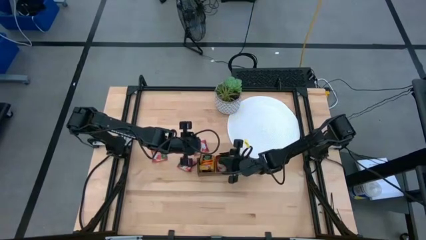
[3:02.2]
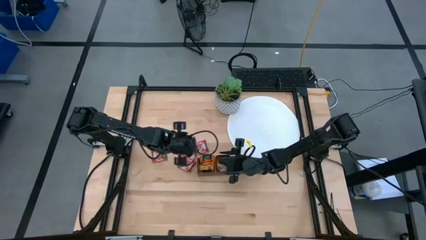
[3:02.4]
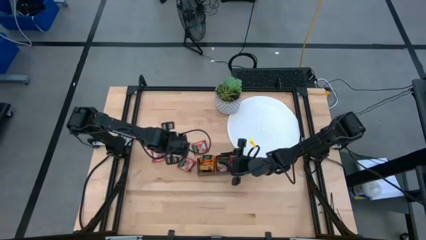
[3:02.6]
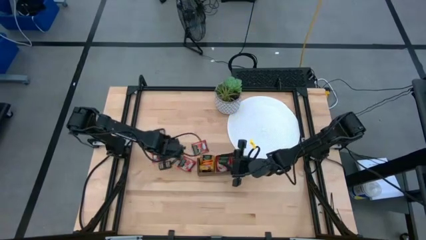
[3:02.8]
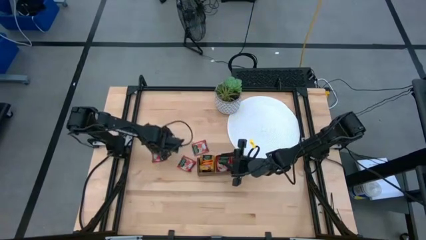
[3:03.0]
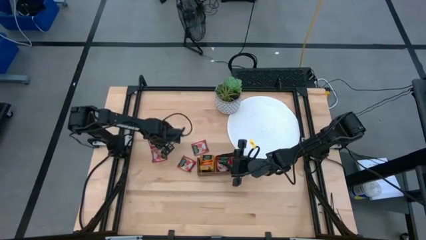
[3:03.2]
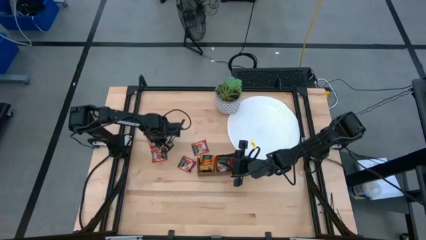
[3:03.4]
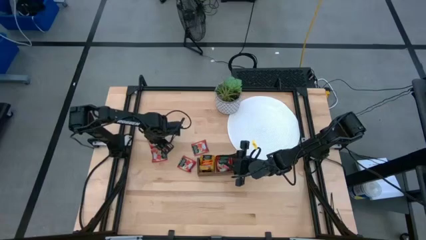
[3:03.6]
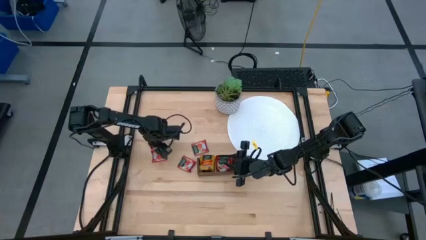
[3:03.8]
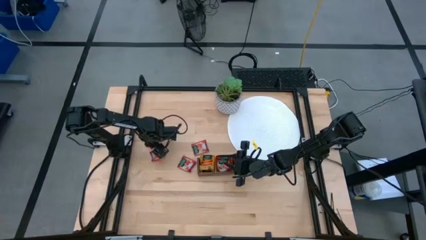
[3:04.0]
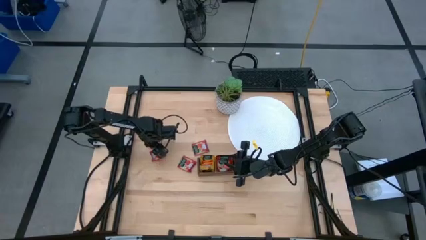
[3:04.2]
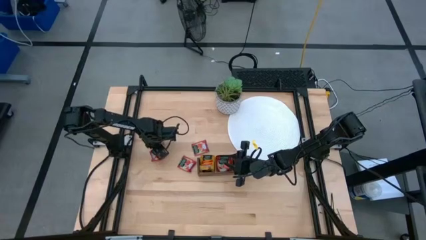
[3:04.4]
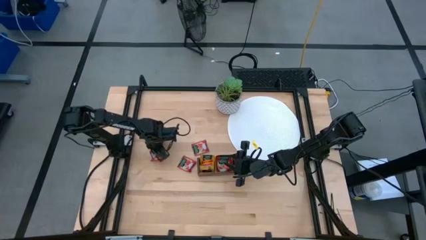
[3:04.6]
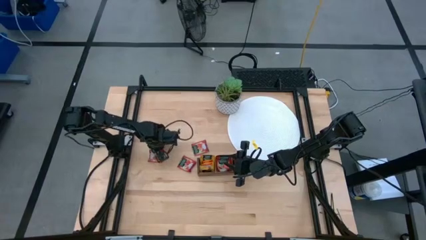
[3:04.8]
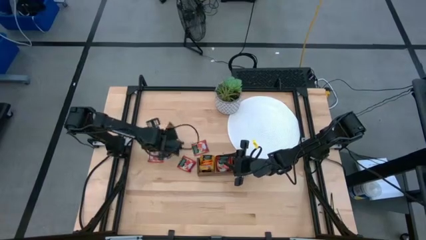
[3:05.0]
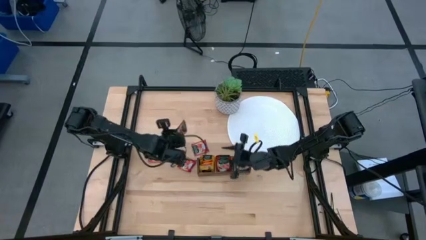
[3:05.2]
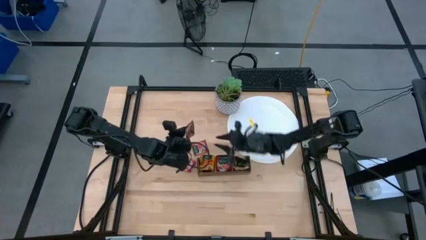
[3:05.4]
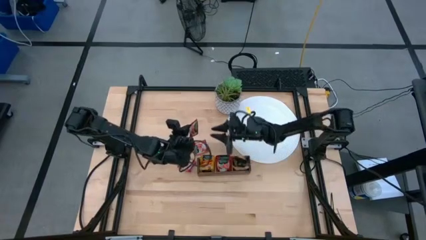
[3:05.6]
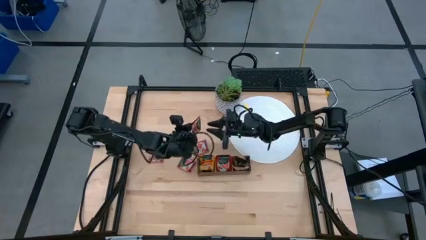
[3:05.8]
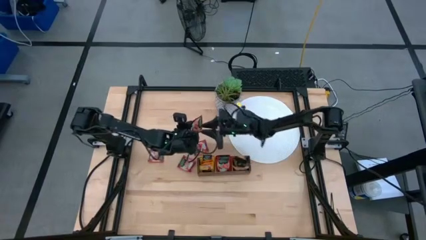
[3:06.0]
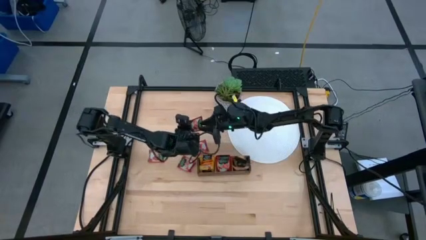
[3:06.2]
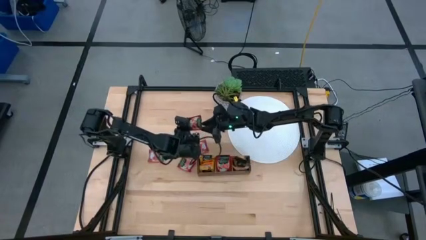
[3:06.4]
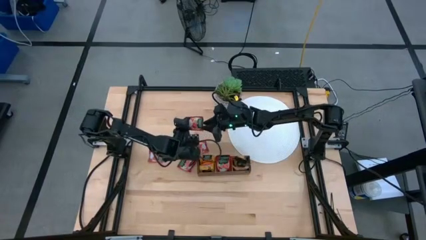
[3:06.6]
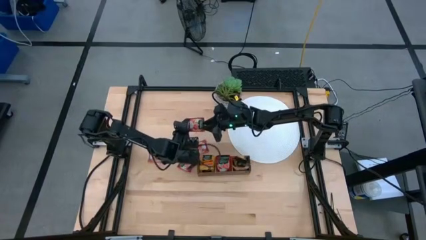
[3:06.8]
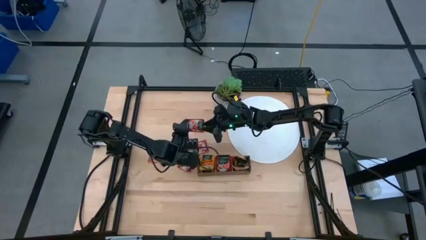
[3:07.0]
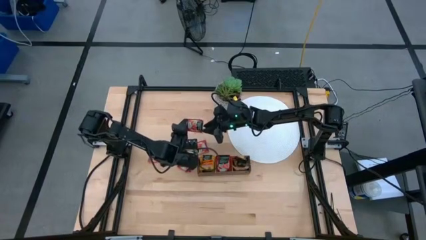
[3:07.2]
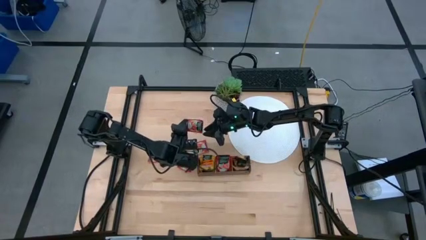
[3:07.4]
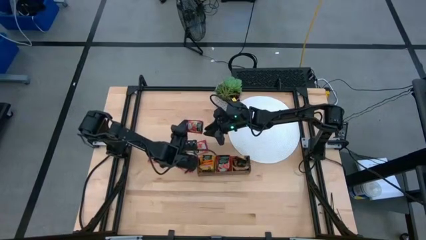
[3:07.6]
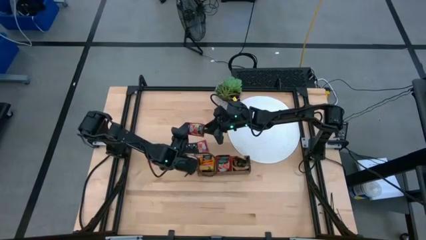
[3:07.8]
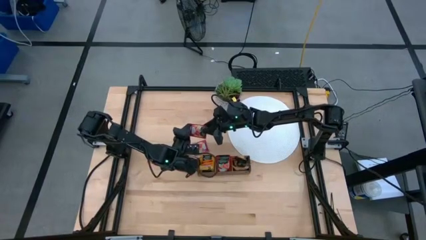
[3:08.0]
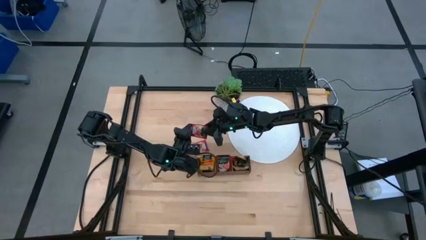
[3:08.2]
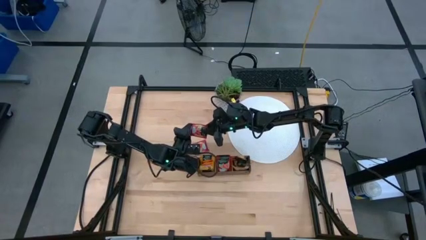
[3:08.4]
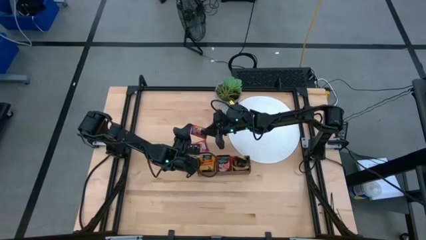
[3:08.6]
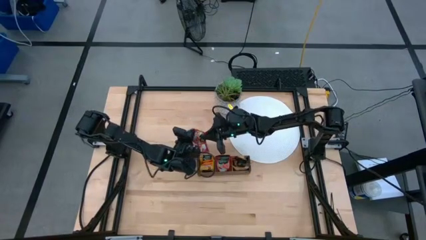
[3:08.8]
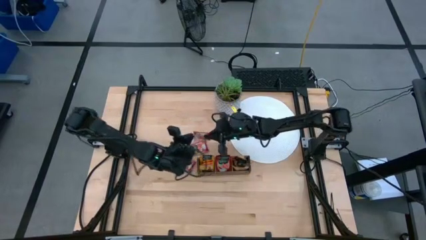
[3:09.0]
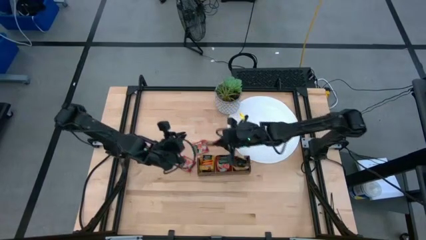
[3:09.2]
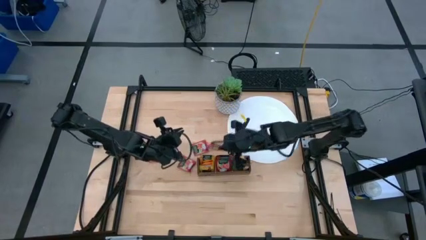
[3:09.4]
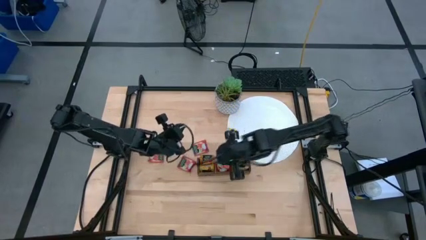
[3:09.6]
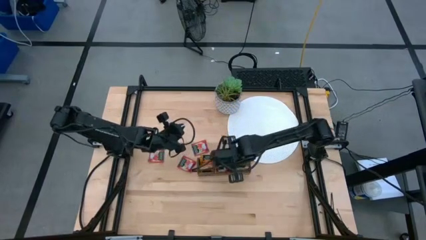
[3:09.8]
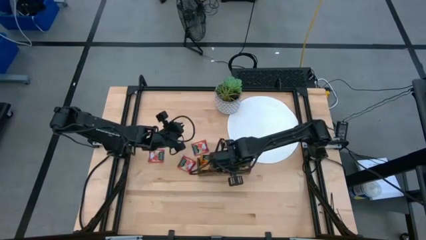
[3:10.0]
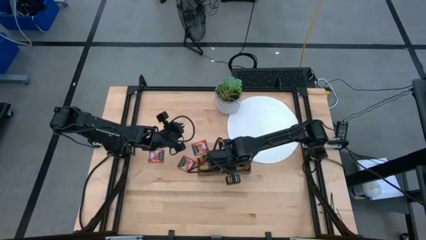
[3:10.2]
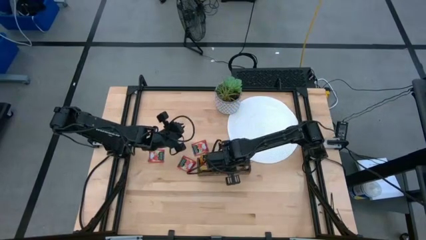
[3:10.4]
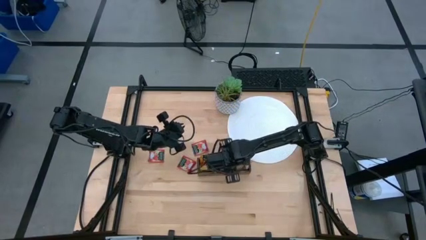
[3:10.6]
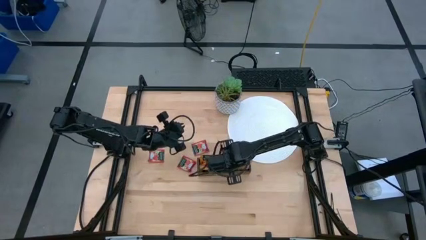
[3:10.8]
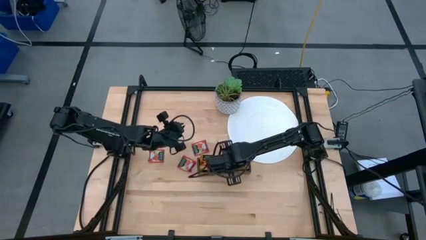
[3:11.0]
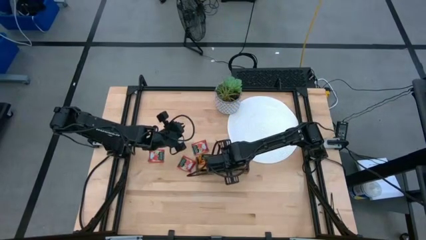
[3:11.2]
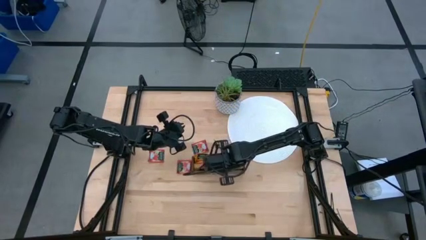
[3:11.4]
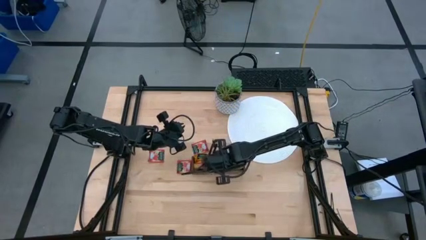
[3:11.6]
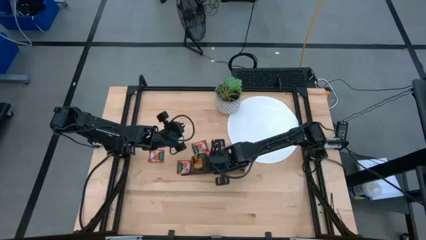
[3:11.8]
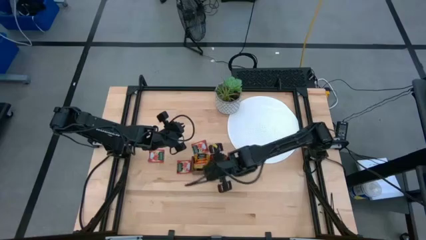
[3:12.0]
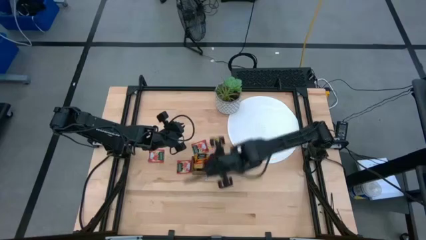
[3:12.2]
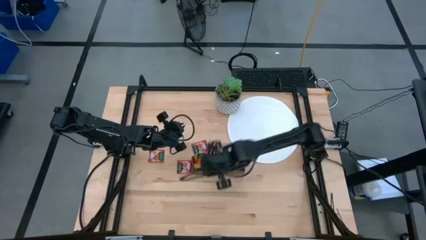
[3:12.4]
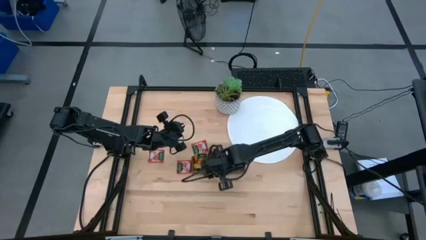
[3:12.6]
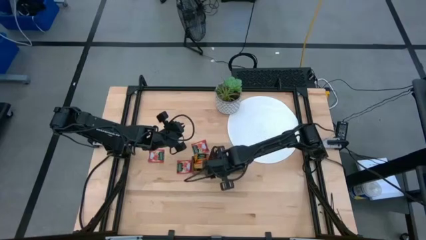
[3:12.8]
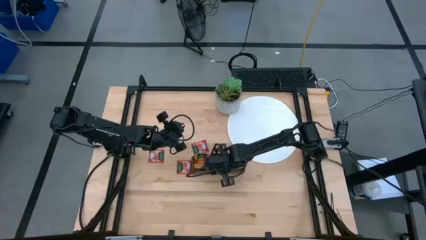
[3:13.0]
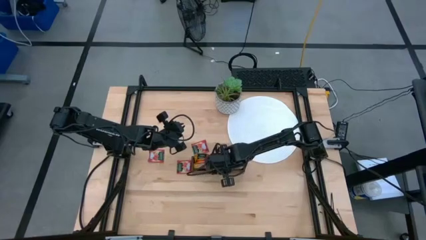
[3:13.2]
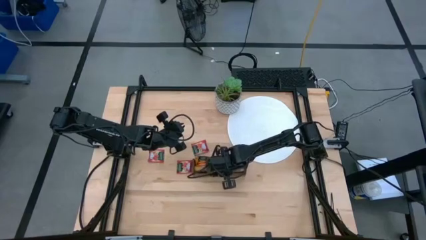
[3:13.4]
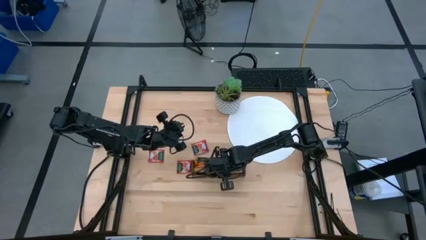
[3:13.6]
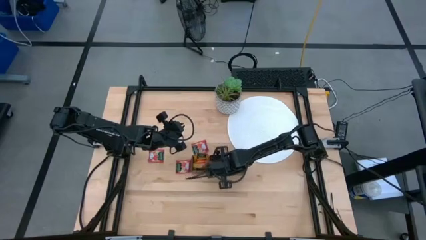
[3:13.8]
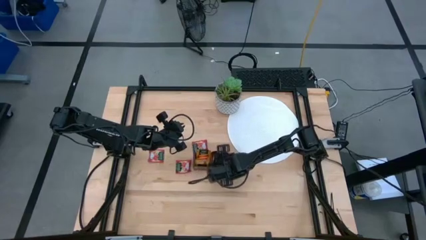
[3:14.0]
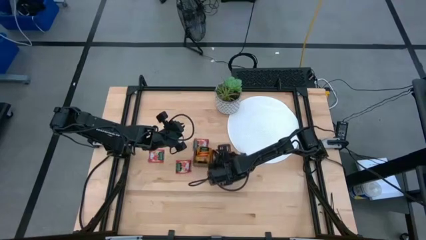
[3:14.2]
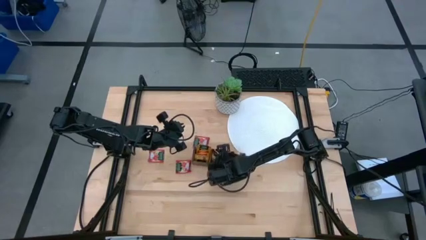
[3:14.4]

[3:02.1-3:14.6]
Task: Pick & Place Tea
Put the red tea bag into the middle section of the wooden organizer

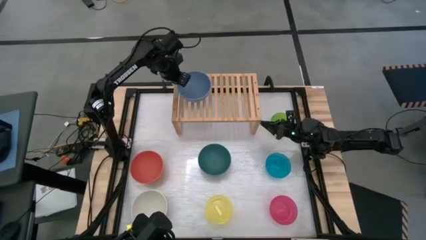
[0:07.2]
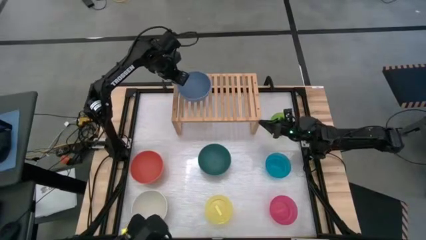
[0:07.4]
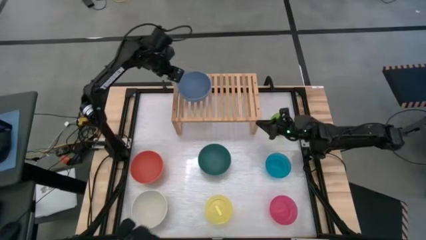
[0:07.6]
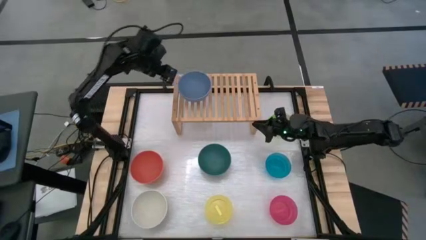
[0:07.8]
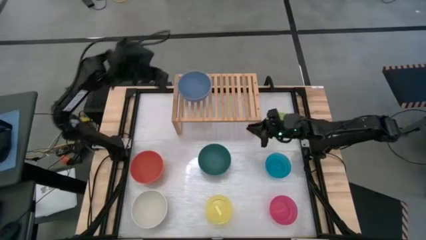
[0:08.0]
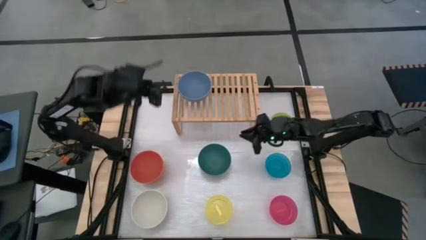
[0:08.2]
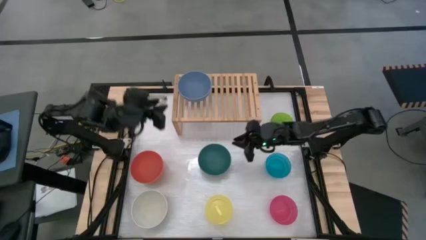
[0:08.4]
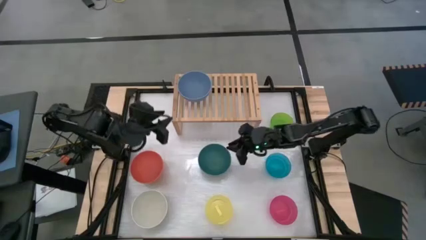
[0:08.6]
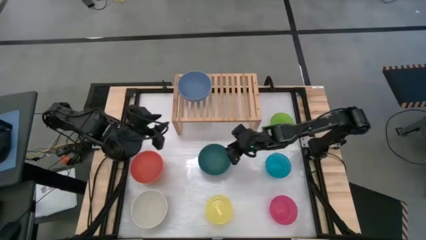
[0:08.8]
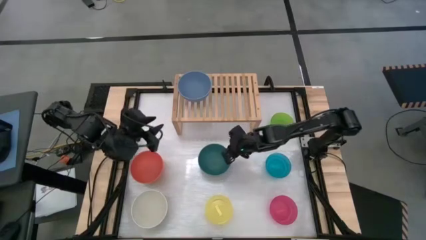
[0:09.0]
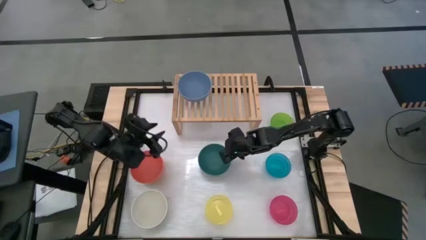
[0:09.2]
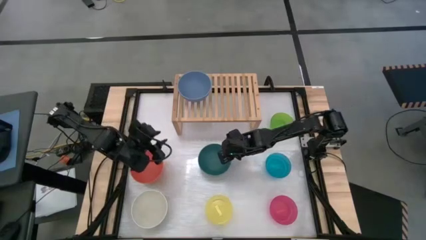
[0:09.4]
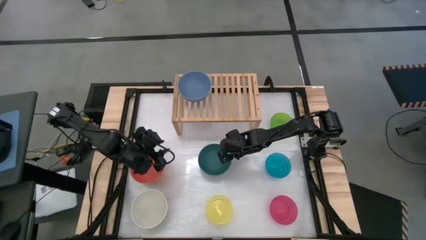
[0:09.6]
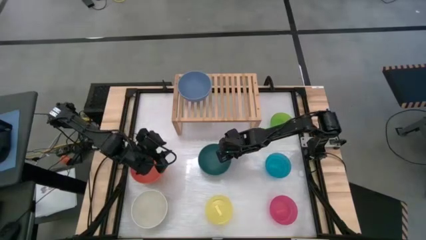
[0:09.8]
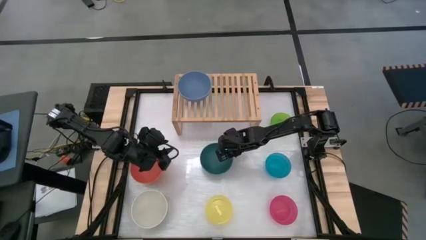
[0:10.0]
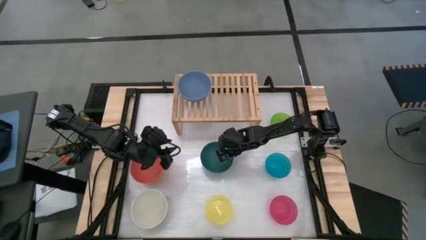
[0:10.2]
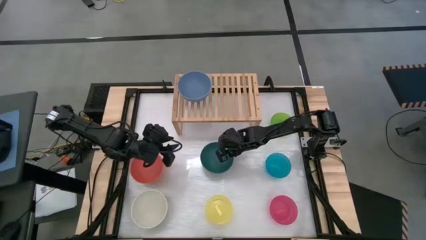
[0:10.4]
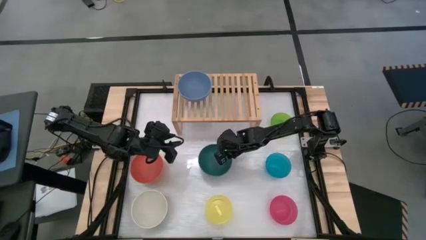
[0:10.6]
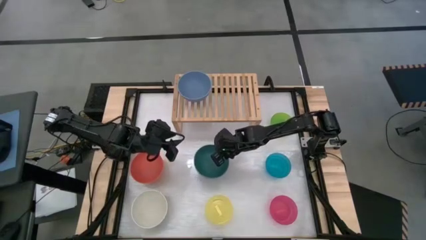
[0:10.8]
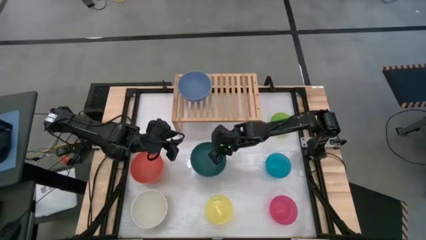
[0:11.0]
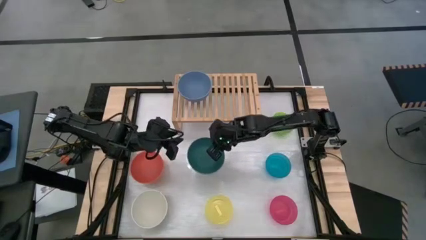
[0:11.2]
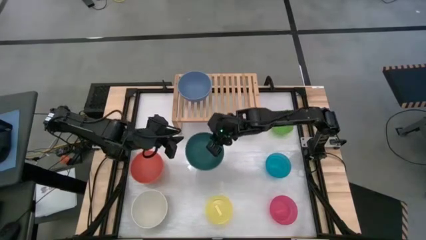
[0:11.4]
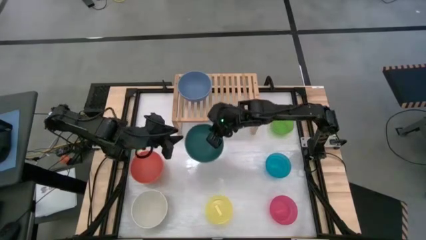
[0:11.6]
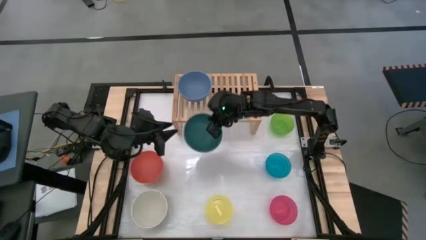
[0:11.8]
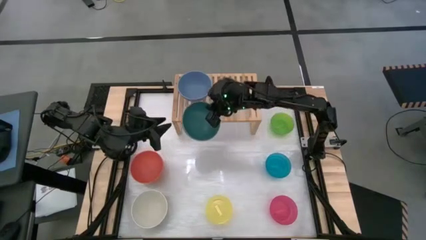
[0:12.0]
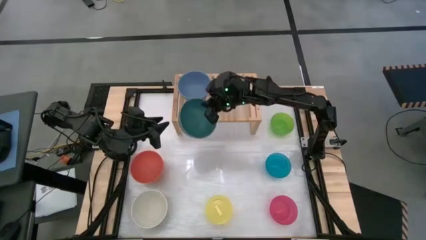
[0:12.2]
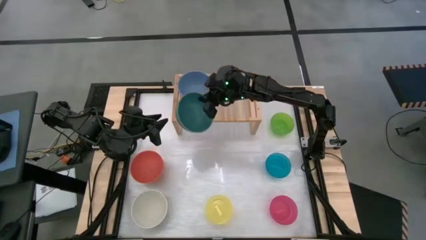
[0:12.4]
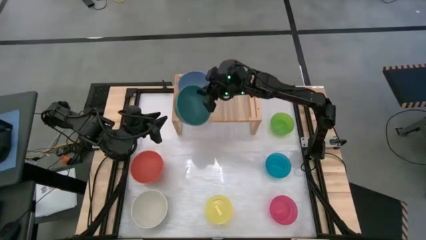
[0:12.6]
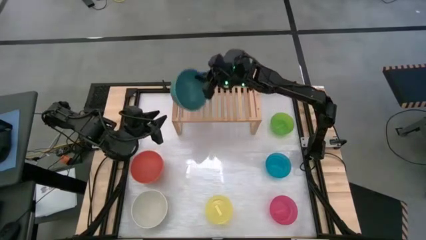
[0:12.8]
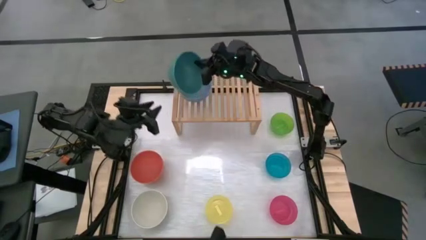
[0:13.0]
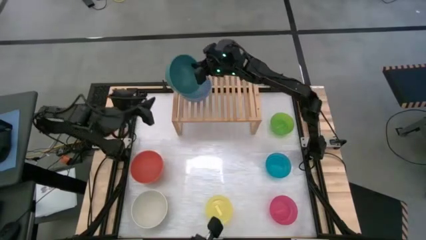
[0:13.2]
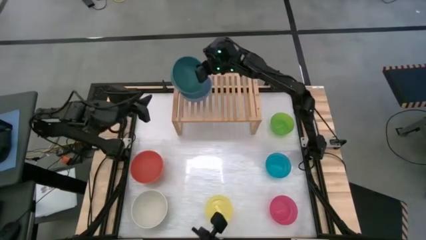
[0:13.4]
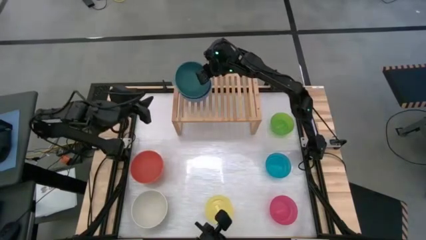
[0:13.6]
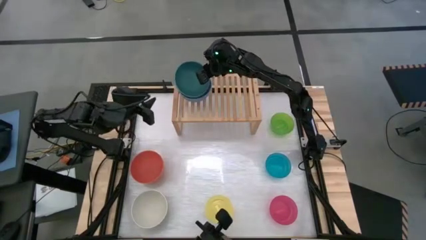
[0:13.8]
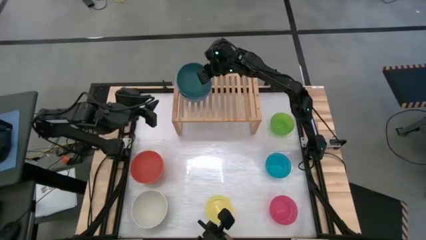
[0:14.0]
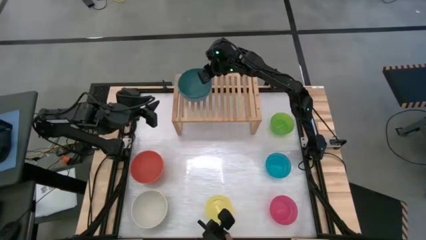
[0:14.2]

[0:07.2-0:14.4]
Task: Place and stack bowls onto a shelf
Stack the dark green bowl on the dark blue bowl on the shelf
